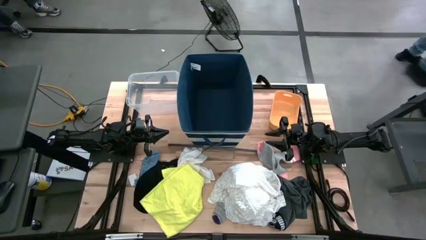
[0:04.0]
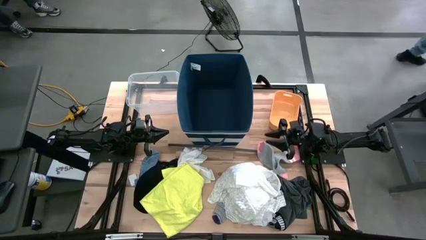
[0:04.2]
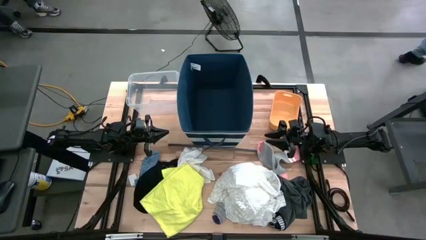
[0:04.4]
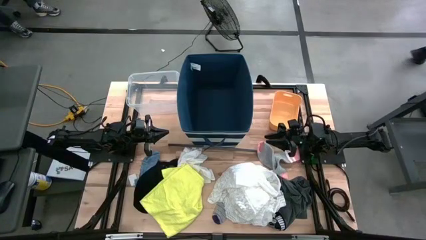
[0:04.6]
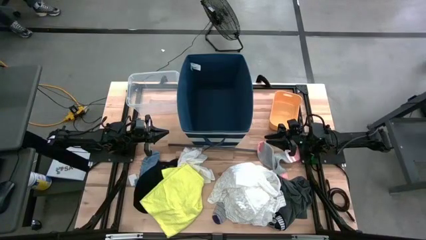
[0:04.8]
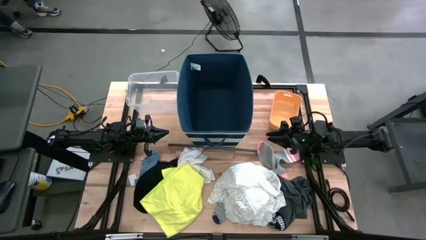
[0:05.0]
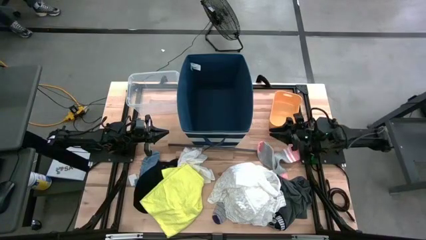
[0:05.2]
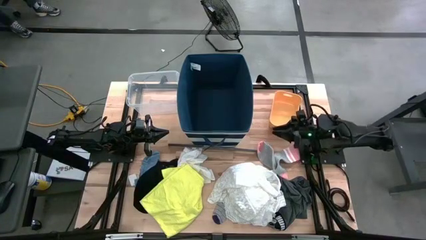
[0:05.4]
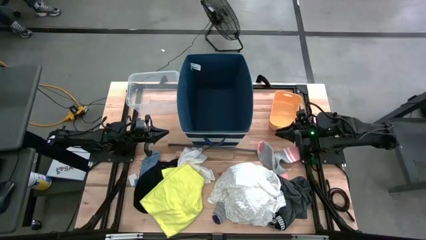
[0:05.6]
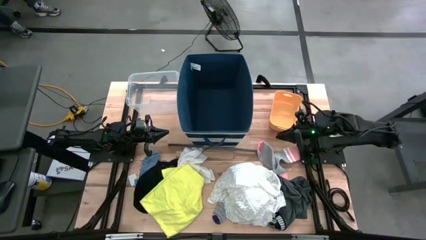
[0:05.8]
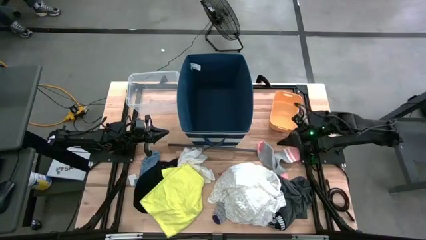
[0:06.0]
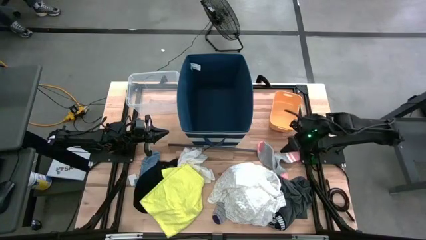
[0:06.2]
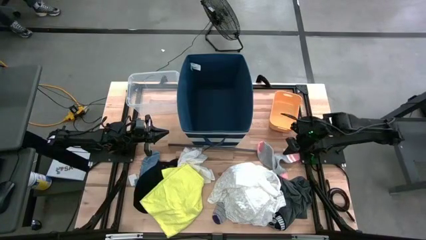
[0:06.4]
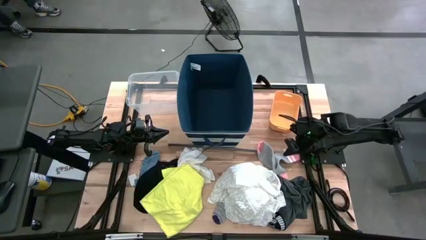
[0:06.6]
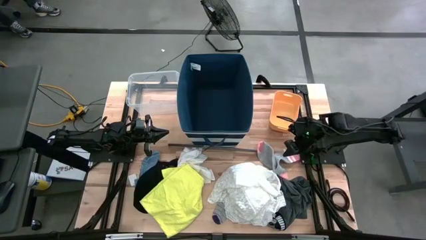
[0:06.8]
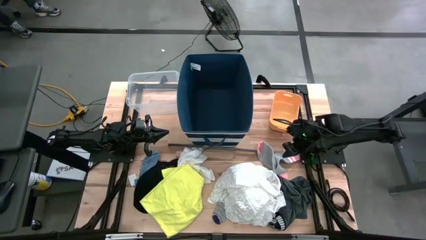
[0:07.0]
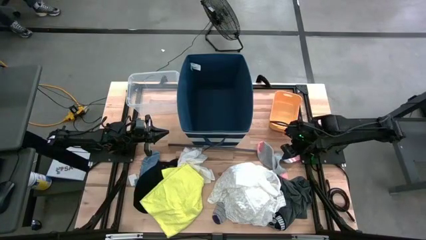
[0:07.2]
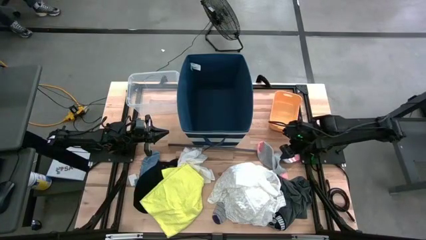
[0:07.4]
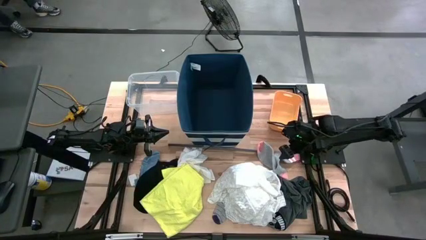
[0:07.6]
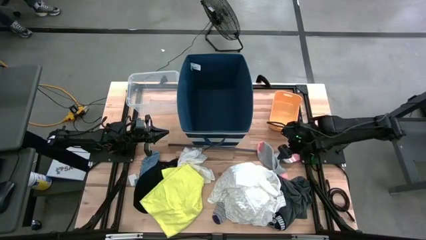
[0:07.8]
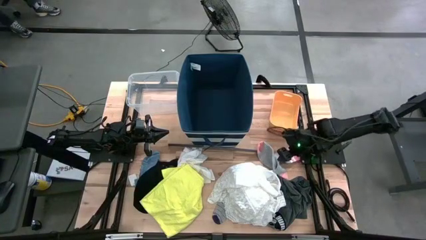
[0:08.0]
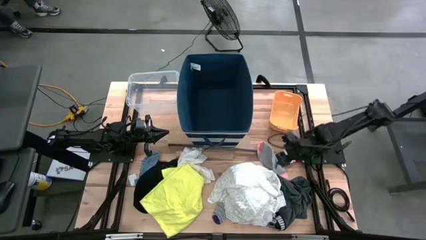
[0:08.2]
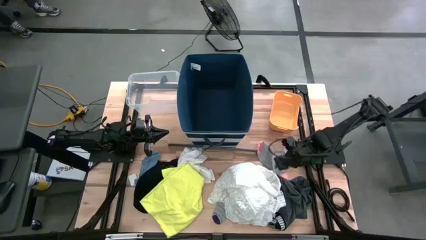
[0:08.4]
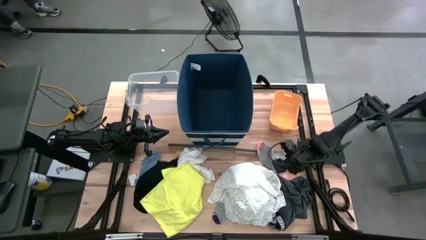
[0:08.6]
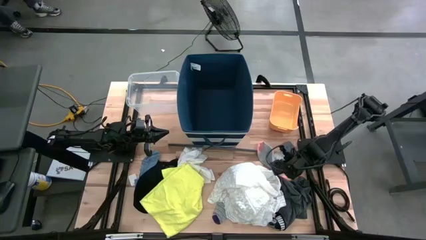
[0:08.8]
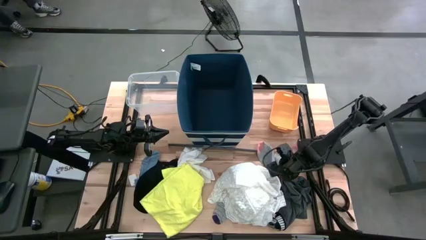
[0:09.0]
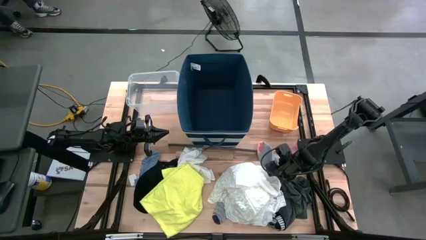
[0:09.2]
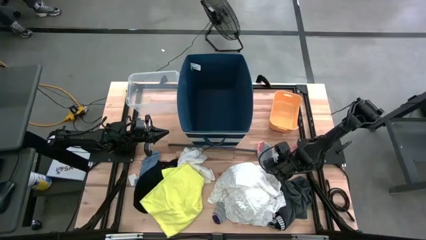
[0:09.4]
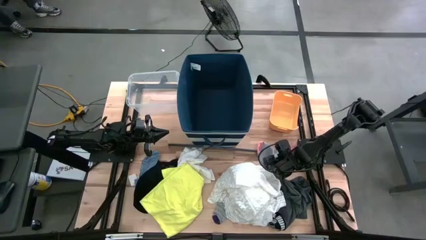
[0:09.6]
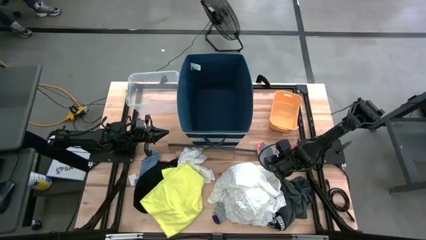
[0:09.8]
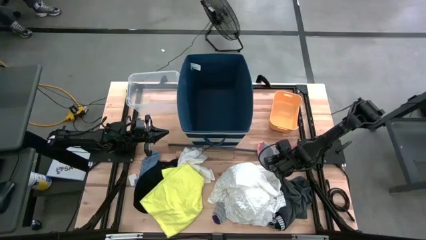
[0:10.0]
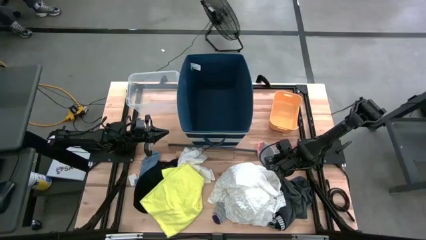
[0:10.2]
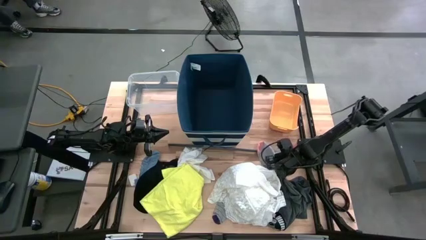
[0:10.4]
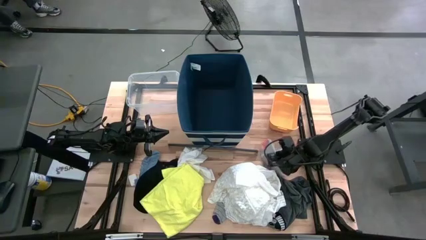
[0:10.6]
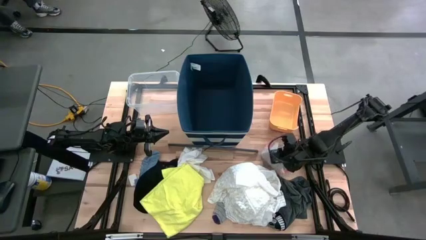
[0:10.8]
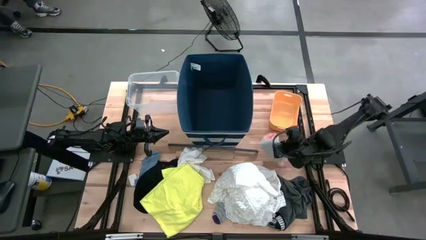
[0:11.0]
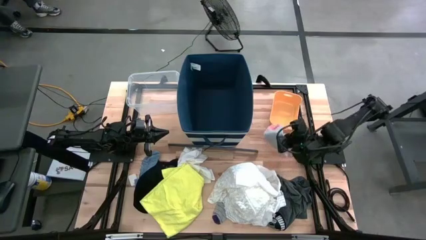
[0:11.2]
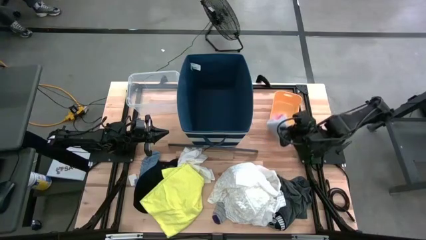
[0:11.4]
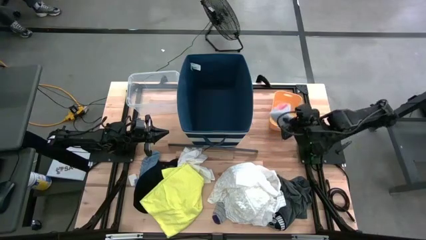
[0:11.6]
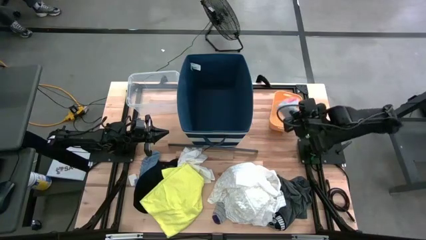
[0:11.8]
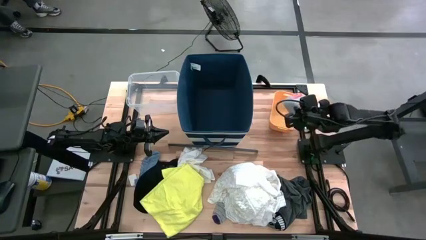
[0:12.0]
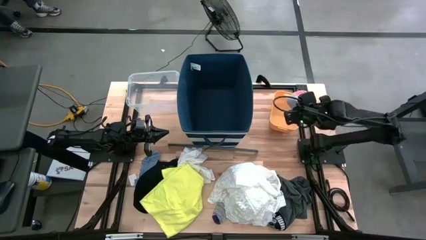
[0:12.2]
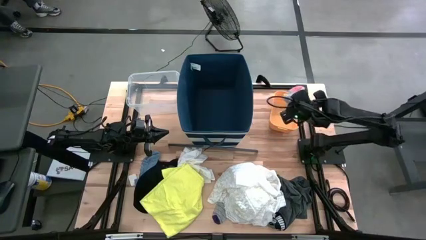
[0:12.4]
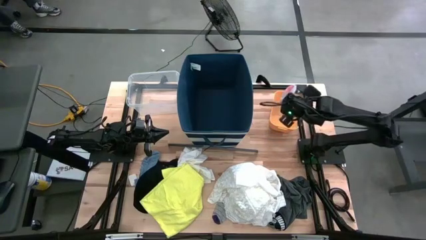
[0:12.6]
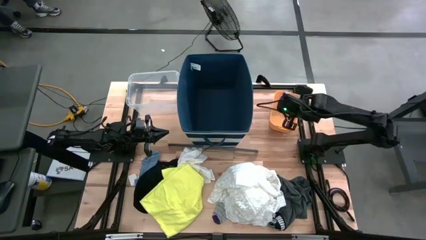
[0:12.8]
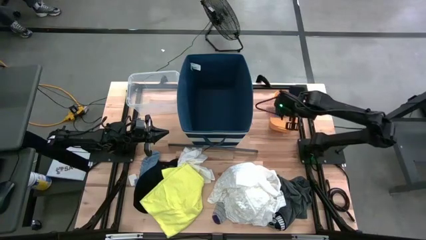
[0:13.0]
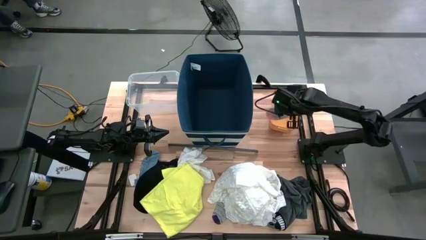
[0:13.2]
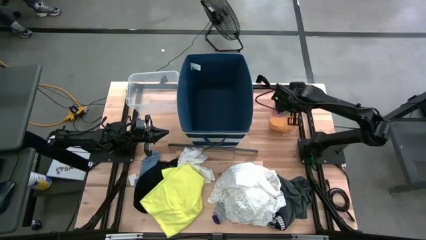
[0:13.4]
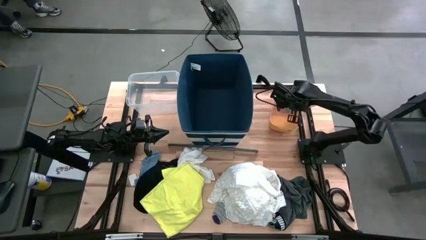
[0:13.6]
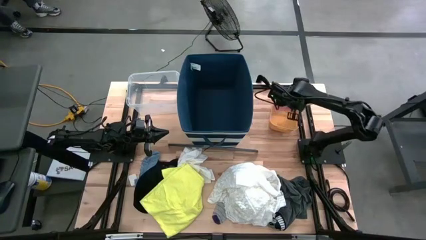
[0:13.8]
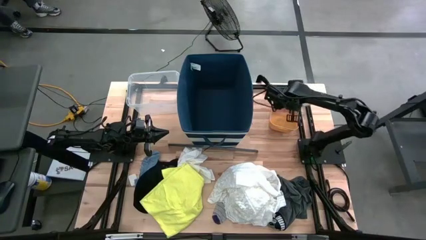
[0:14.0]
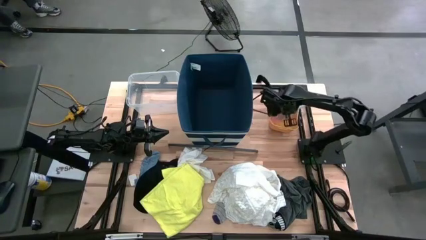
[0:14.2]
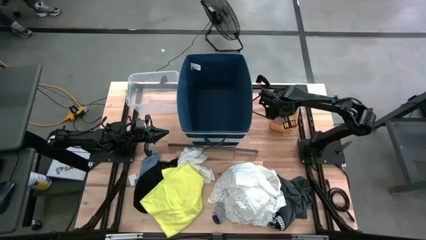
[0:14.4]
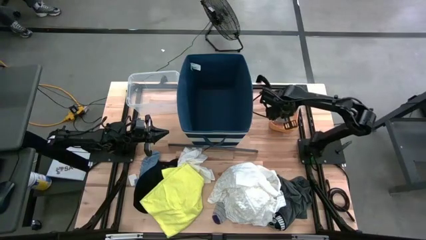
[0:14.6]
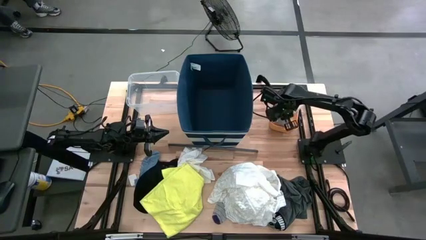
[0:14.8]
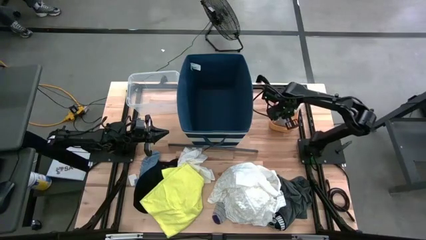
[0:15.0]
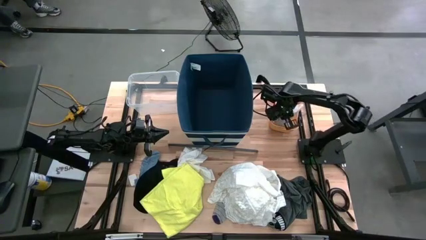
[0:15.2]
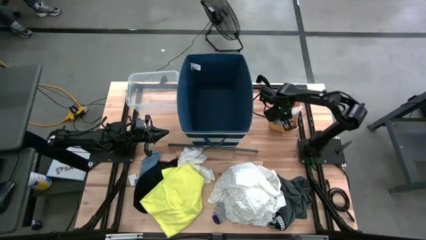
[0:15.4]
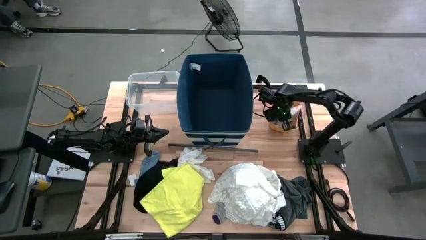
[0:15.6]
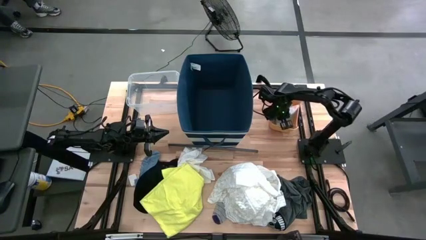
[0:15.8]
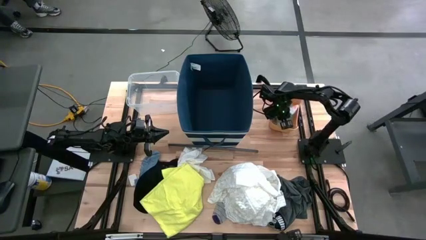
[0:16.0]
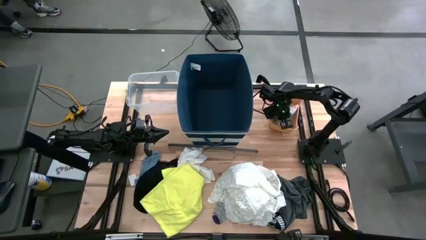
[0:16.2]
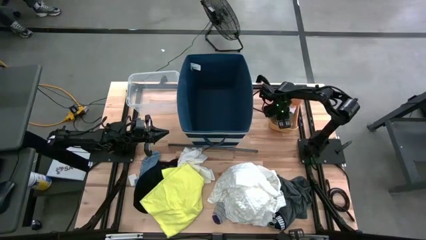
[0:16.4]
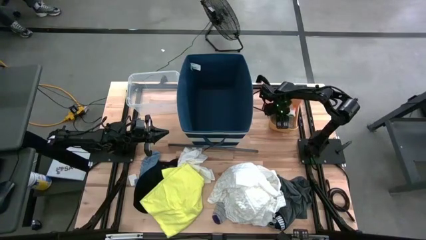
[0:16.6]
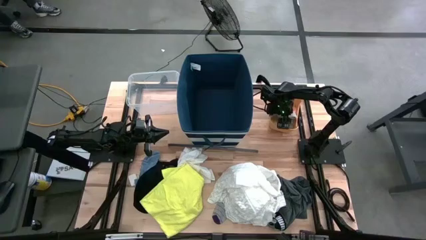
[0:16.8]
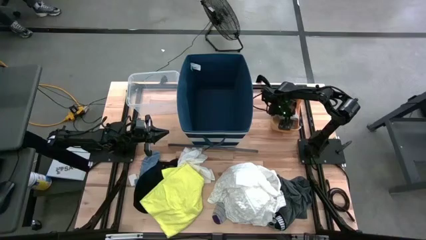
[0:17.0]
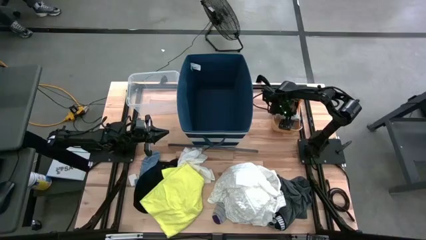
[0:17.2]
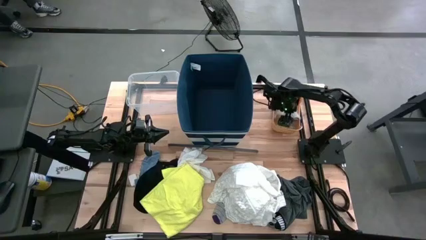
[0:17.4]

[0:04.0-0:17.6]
Task: Pick & Place Cloths
Put the grey sock into the orange bin
